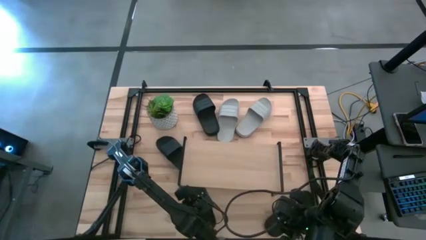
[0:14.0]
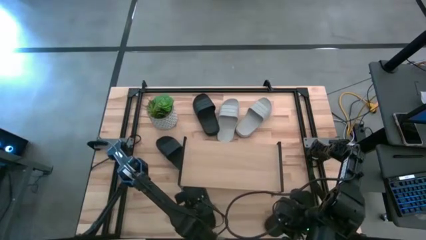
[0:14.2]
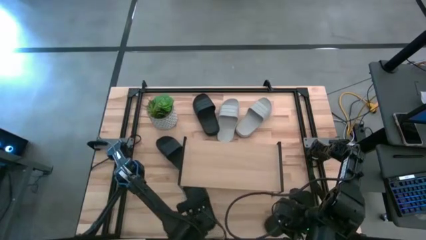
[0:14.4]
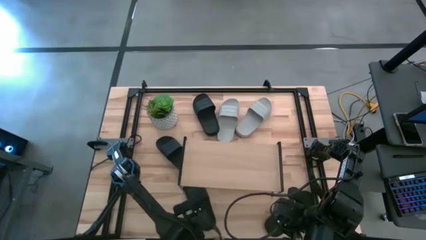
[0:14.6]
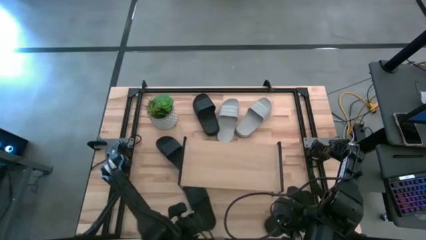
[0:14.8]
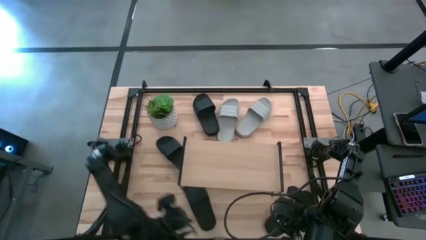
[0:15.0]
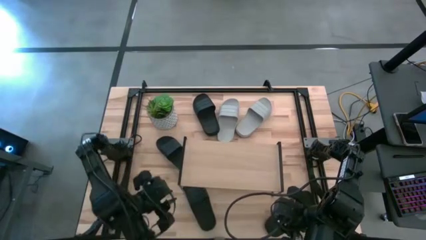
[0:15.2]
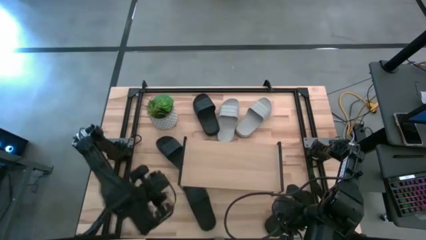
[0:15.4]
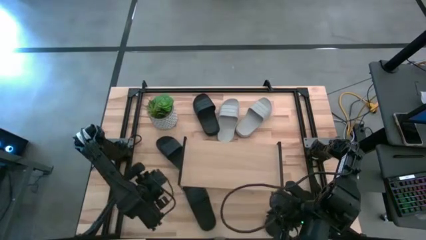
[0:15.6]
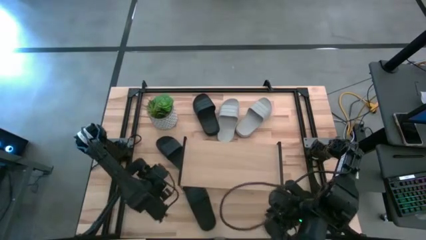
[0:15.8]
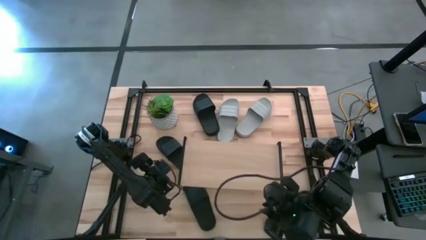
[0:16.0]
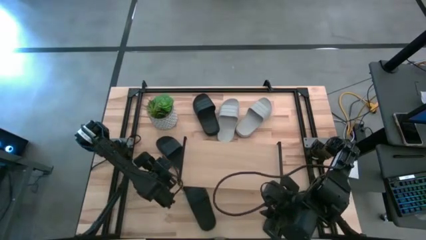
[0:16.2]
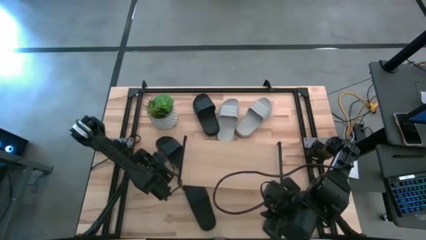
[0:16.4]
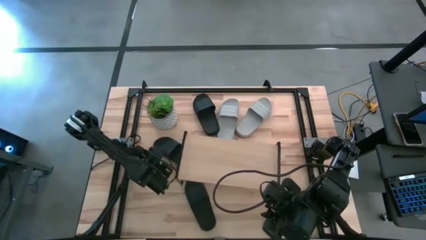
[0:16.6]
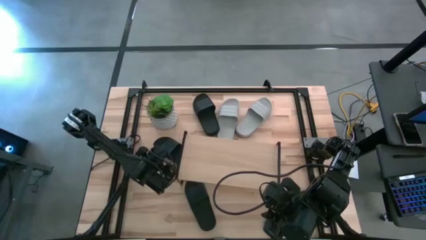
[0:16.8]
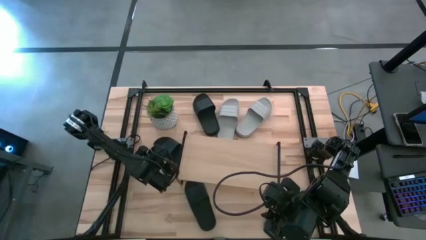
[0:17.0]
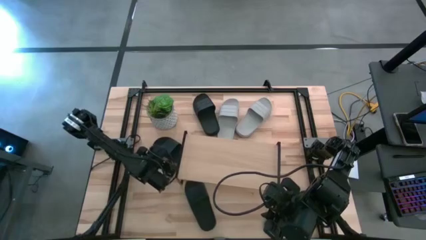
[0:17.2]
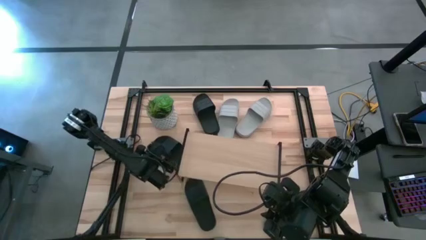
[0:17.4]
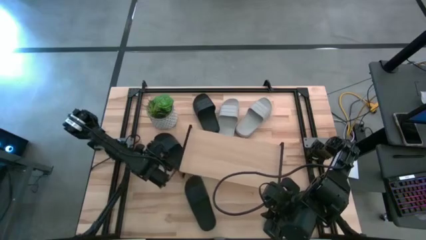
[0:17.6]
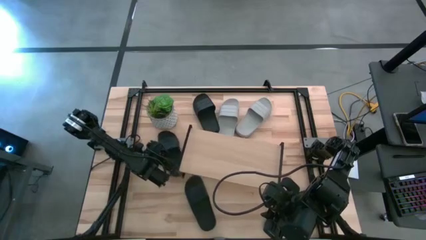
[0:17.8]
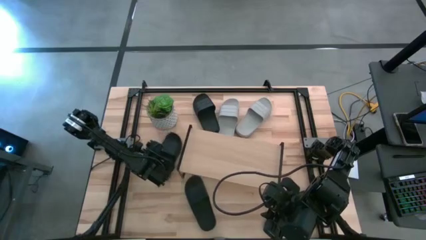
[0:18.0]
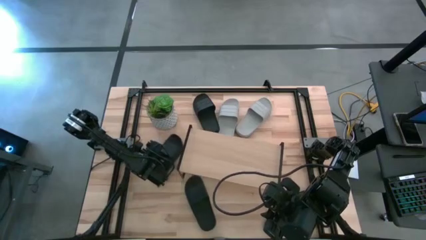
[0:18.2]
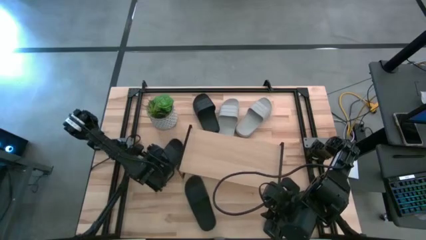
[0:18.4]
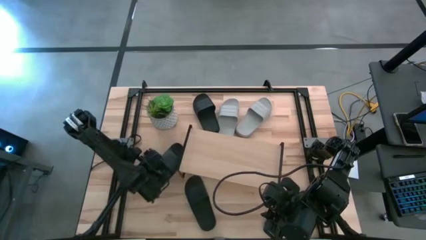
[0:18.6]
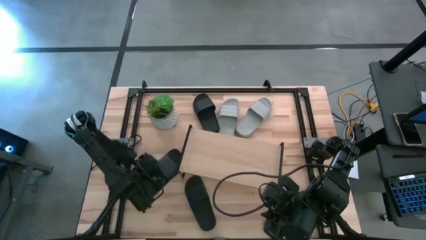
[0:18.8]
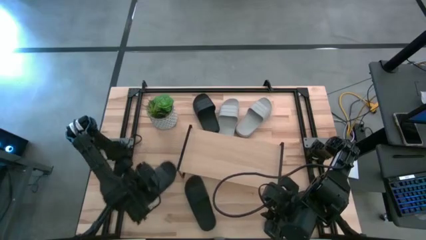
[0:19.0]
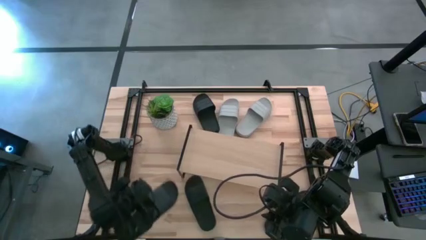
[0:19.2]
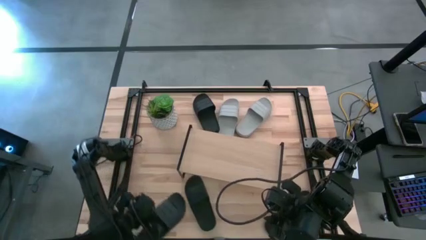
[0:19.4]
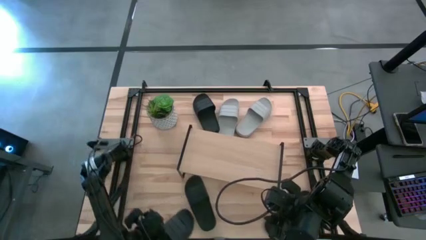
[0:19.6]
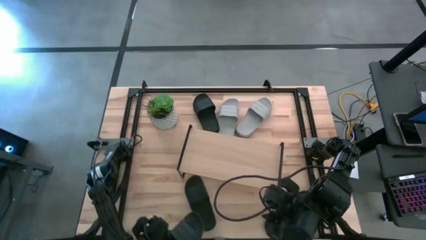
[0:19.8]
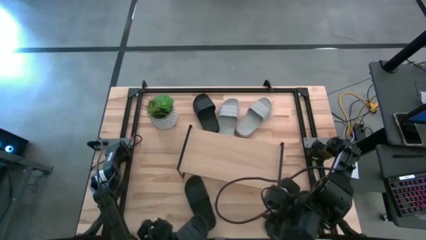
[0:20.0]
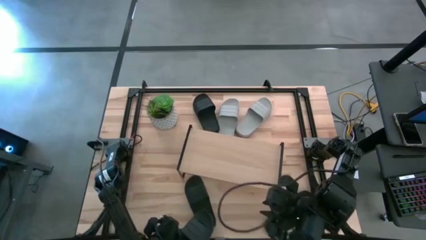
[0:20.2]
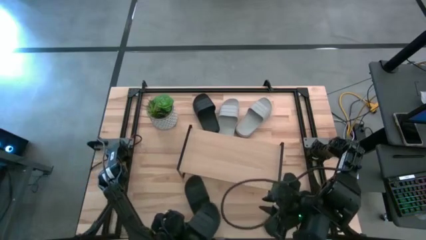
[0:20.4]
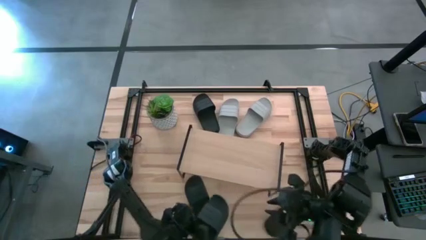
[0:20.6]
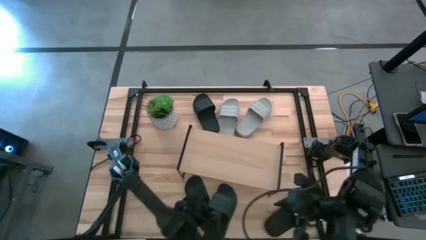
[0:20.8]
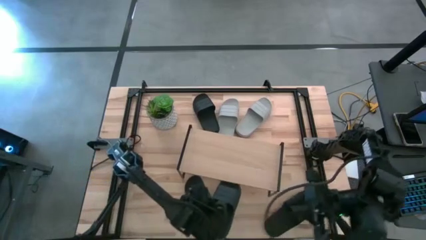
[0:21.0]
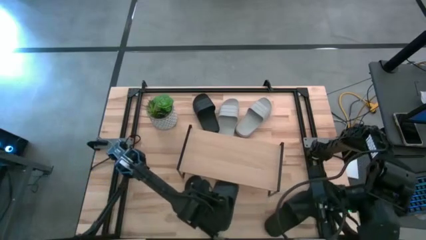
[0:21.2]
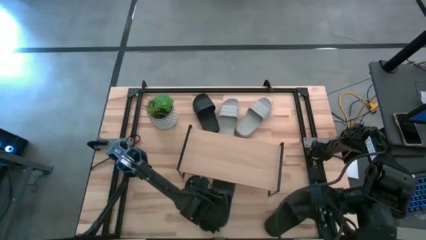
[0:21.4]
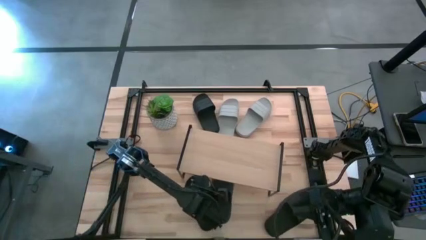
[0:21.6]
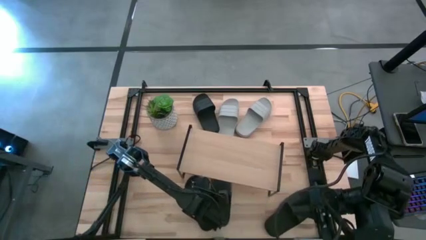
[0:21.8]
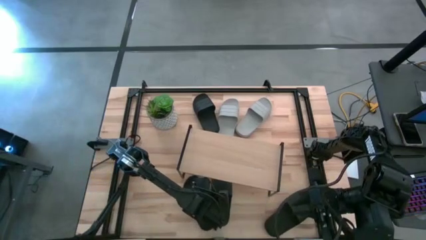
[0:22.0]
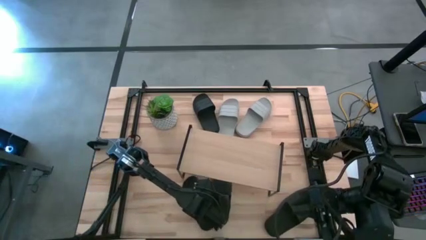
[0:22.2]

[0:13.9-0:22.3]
Task: Pick and place slides into the shelf
Put the black slide under the shelf

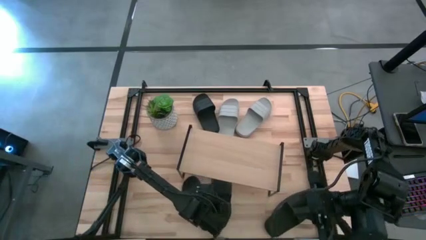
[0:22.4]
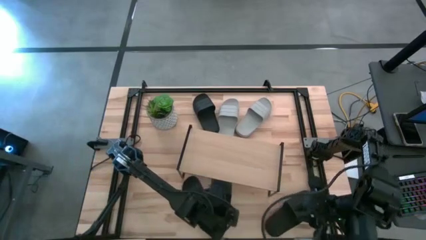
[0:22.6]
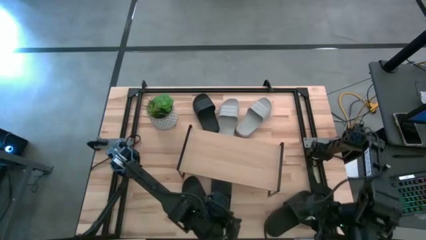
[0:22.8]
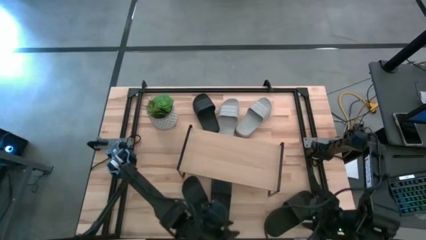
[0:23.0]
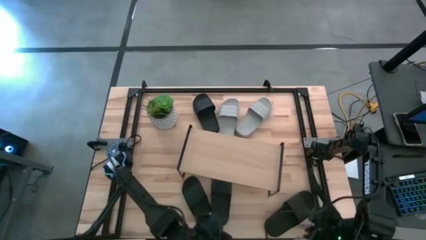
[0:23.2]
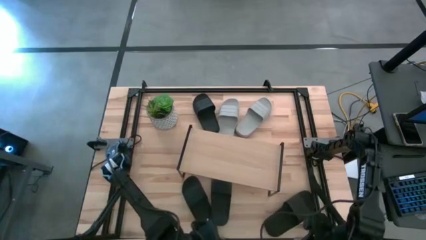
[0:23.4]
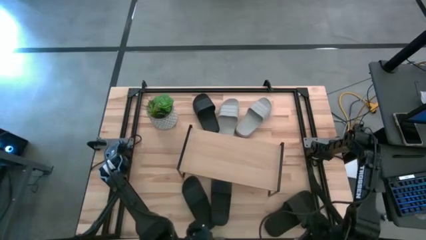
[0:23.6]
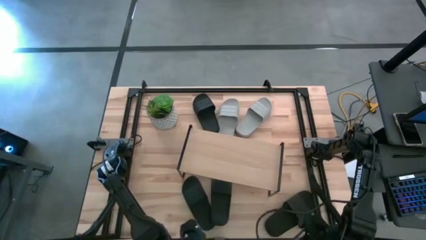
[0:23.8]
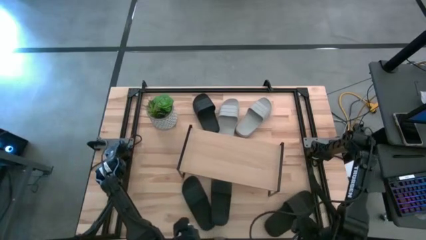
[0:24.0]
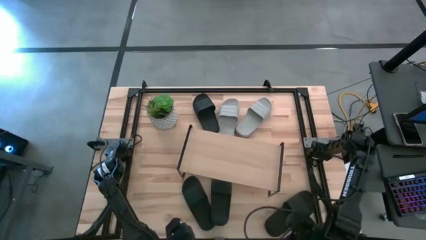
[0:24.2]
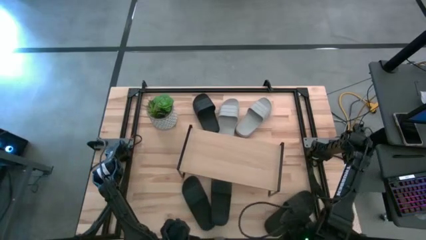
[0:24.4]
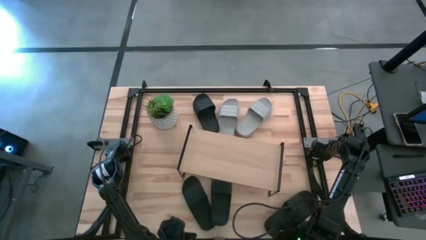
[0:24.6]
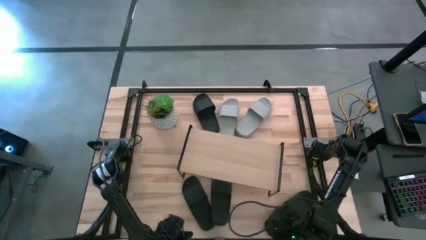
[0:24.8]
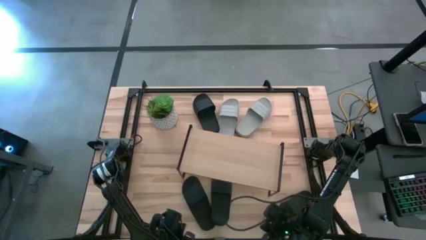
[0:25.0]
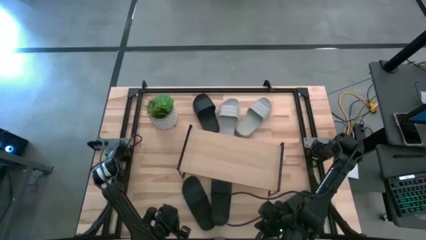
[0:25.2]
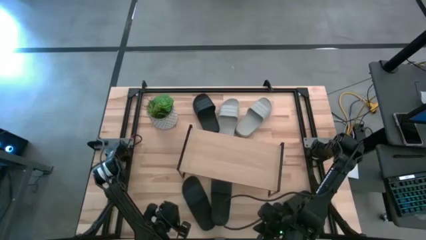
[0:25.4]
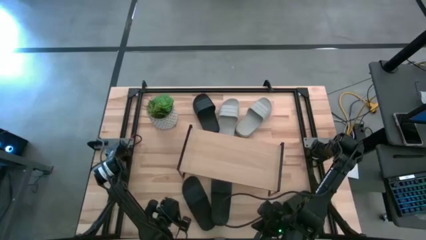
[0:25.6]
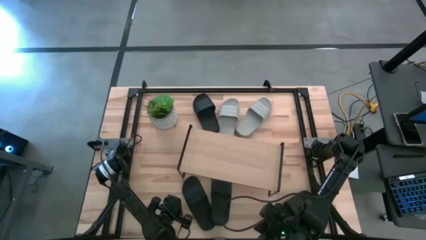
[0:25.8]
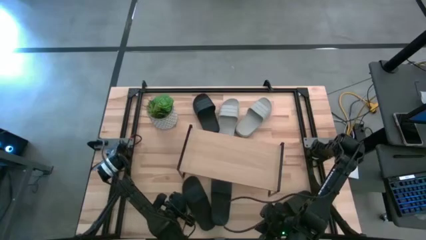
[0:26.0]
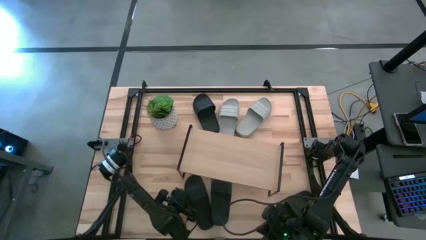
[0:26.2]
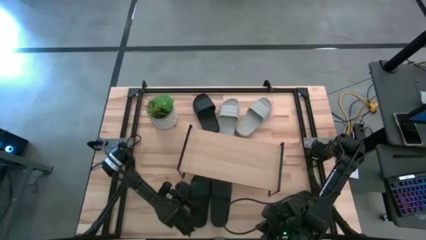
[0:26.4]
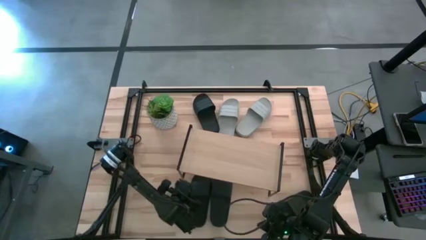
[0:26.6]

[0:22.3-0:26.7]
Adjust the black slide under the shelf

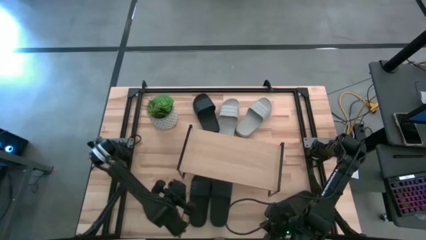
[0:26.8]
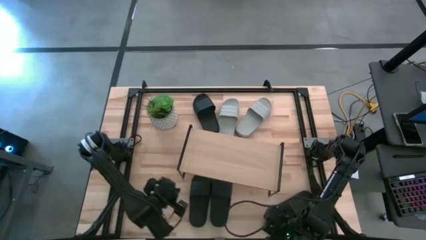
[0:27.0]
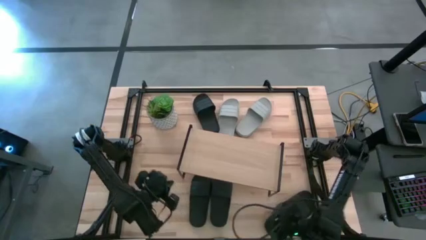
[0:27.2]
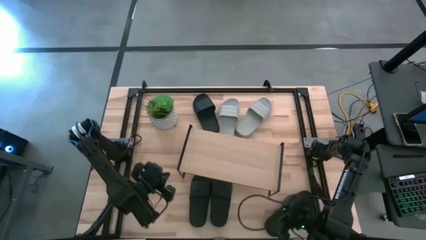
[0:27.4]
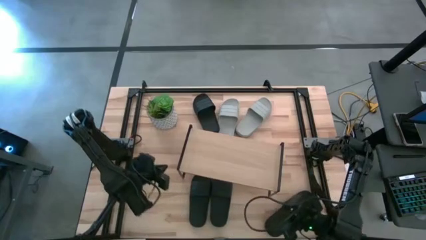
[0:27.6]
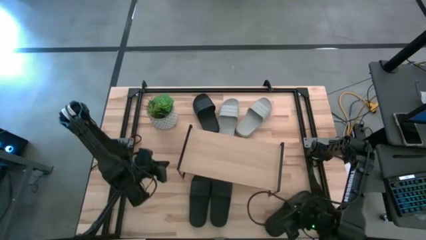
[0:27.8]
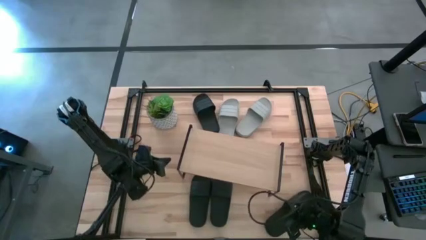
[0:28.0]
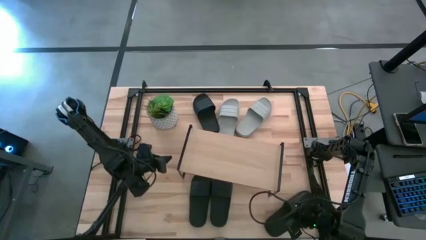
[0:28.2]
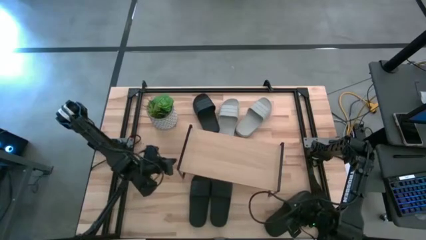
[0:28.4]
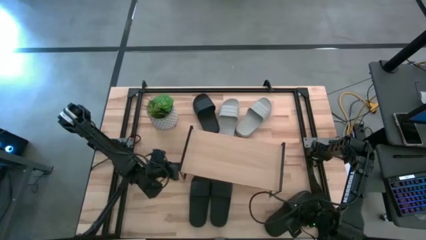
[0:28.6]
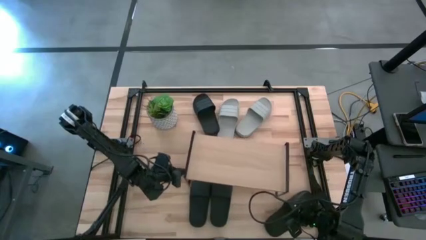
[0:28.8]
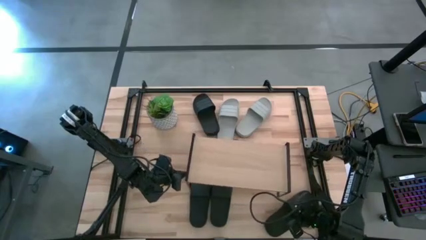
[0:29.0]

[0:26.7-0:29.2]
Adjust the shelf

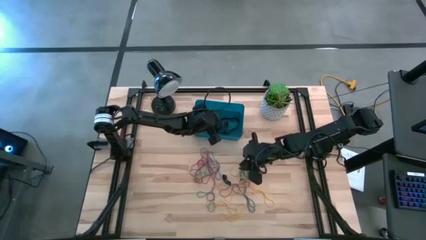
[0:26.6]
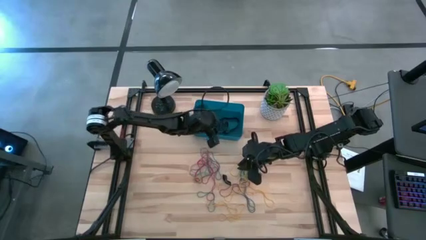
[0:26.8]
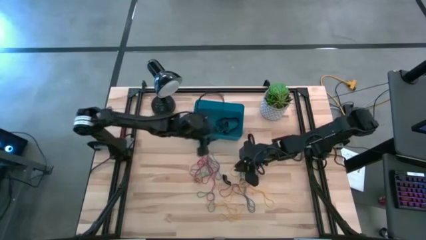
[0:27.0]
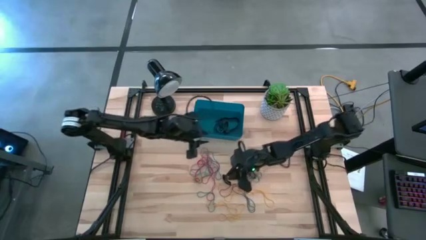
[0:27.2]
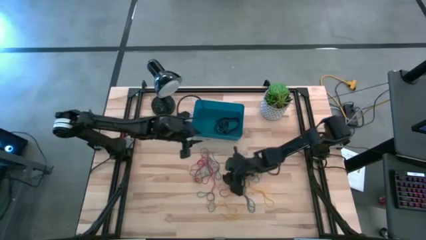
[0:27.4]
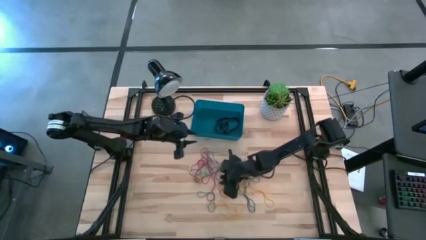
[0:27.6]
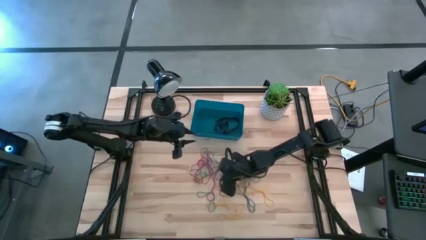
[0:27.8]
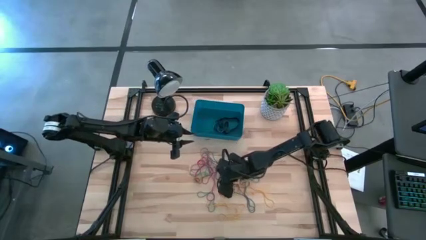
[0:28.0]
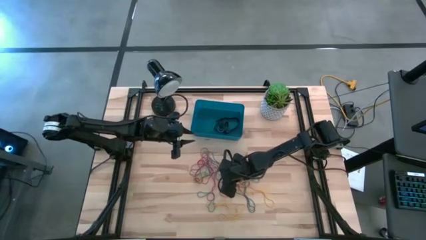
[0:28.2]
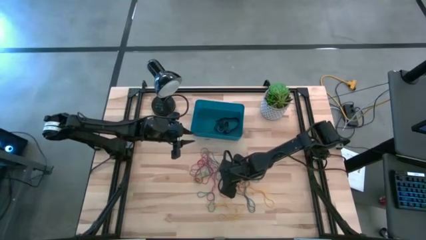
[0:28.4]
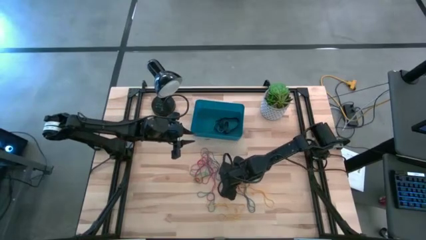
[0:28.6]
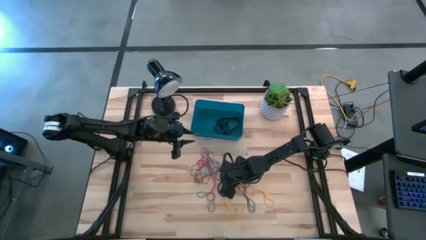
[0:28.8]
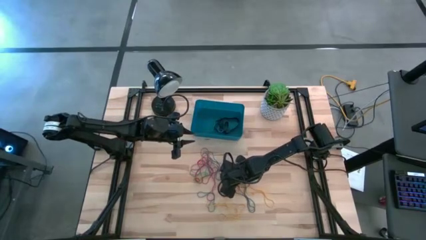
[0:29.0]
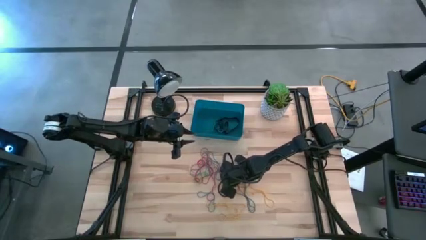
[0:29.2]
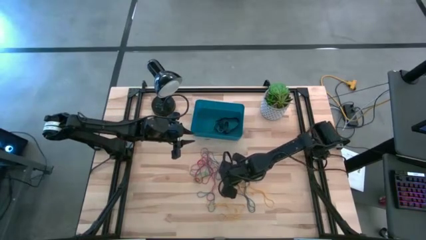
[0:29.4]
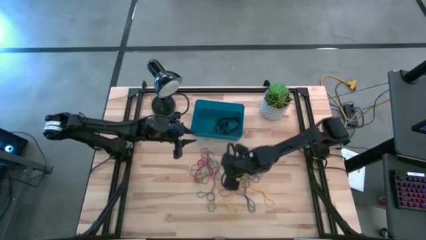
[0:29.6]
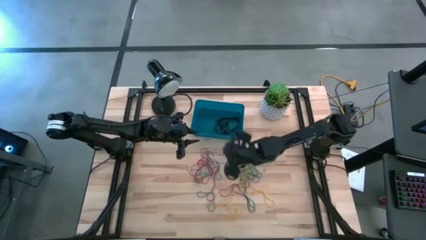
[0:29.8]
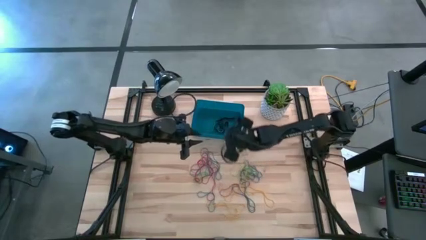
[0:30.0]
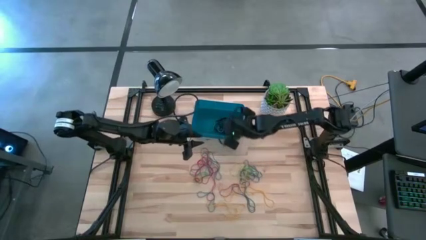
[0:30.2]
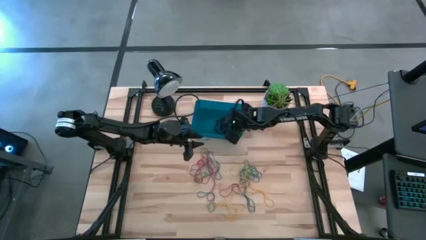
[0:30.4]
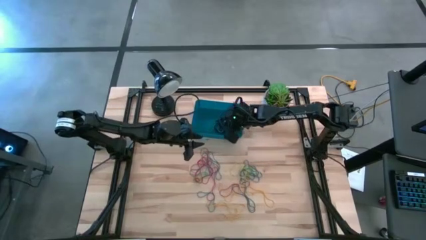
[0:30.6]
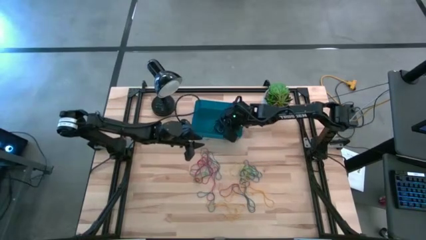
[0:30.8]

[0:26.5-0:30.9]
Task: Pick and place rubber bands into bin
Put the black rubber band into the blue bin
